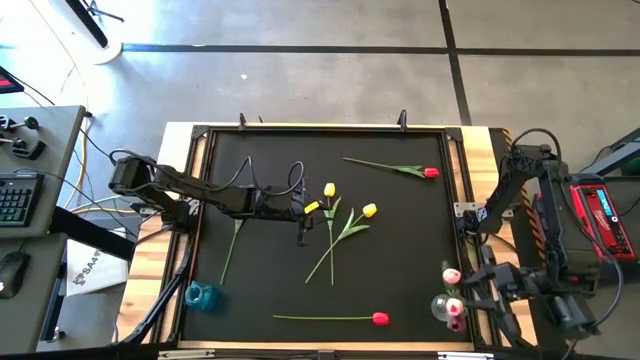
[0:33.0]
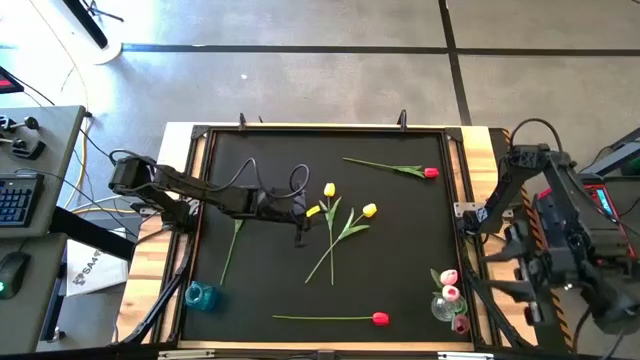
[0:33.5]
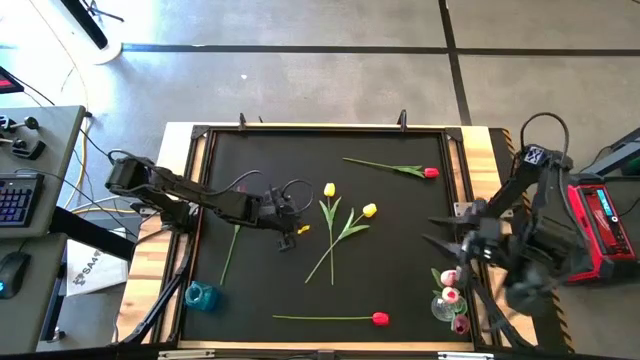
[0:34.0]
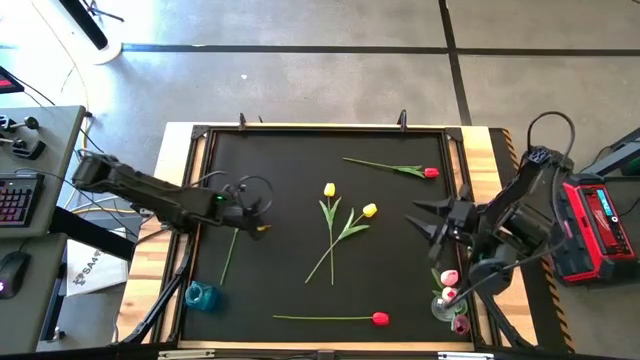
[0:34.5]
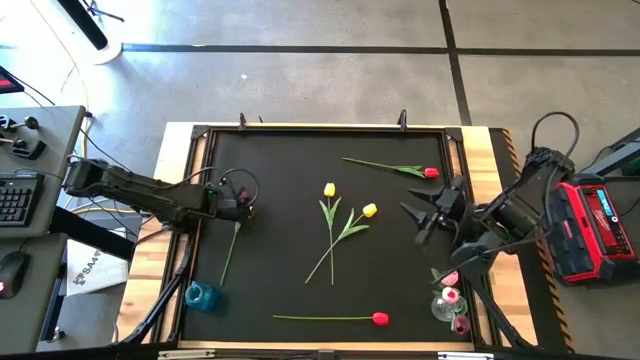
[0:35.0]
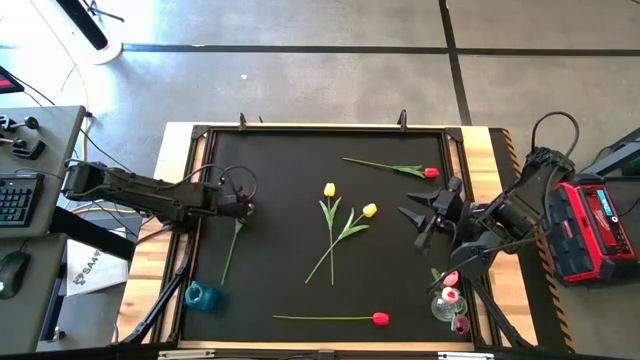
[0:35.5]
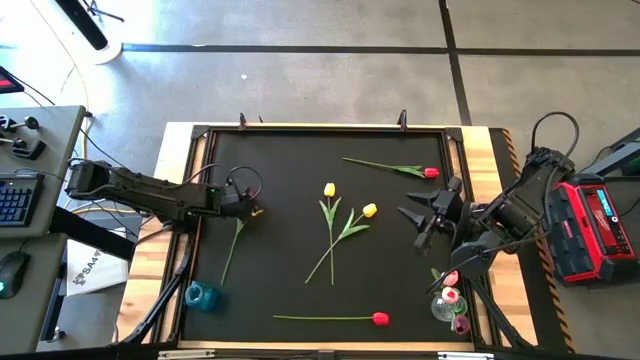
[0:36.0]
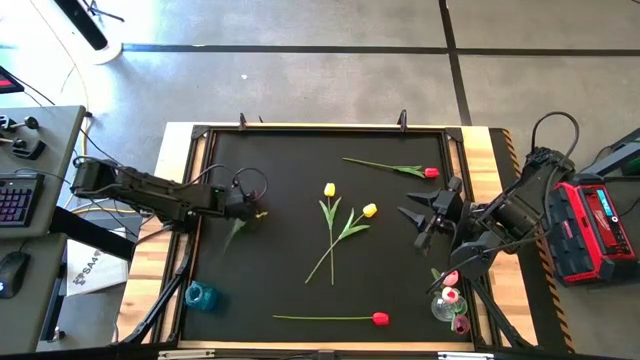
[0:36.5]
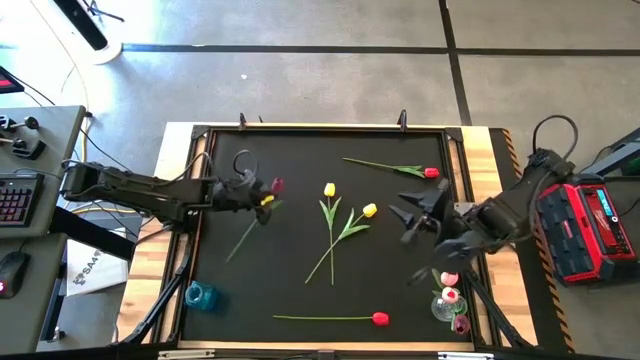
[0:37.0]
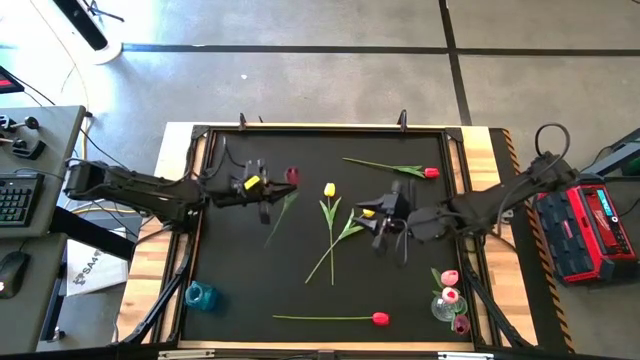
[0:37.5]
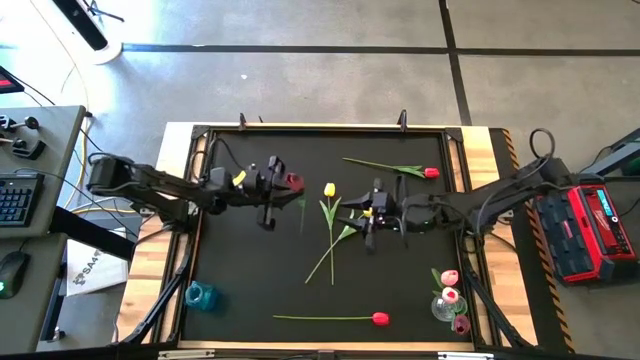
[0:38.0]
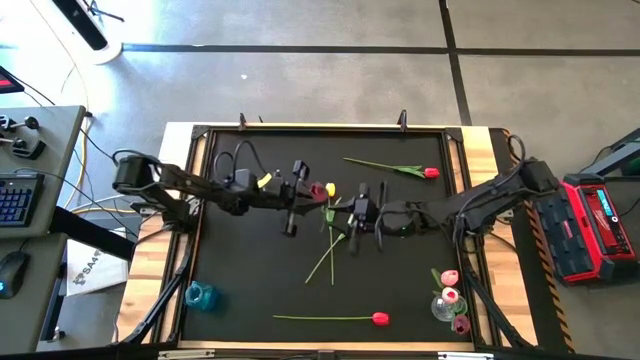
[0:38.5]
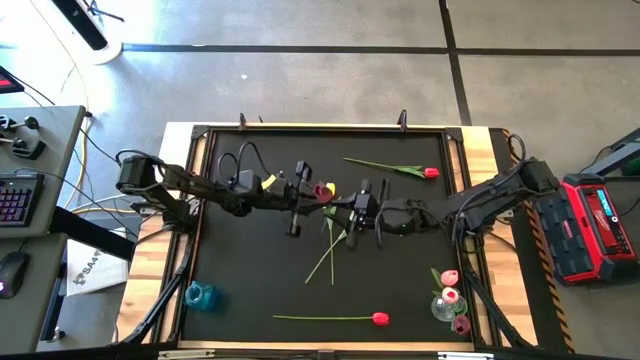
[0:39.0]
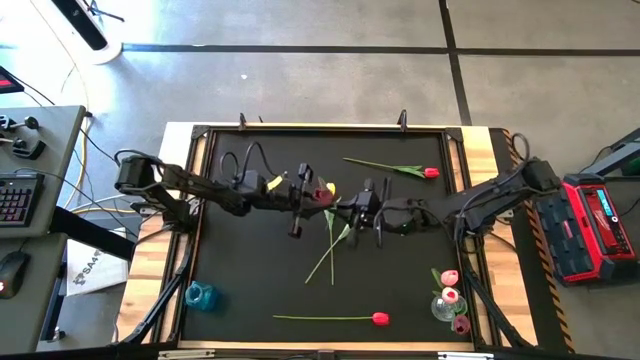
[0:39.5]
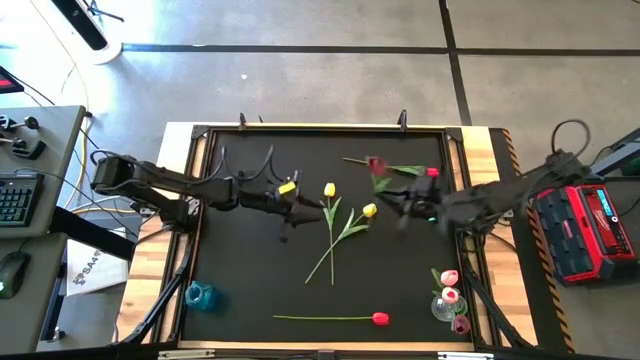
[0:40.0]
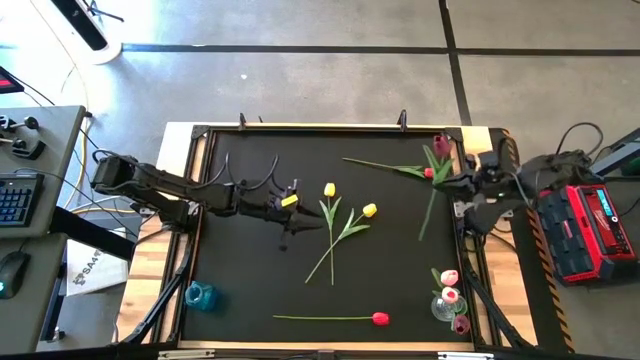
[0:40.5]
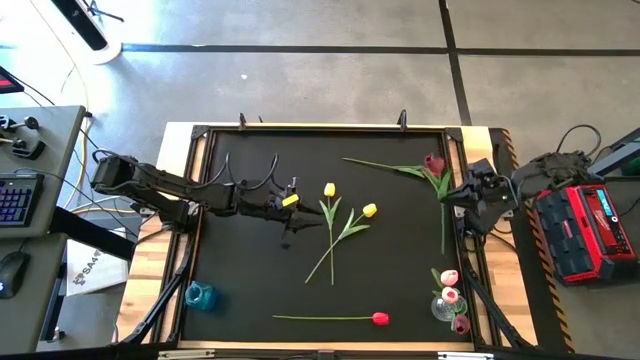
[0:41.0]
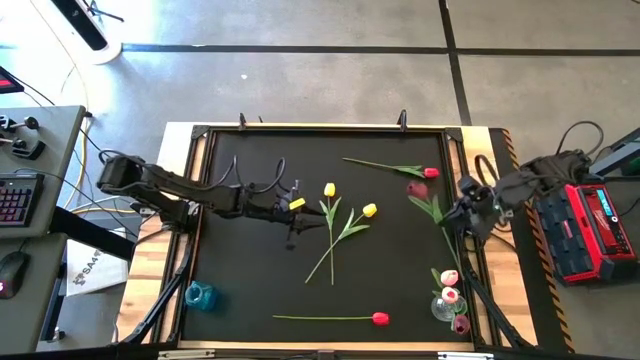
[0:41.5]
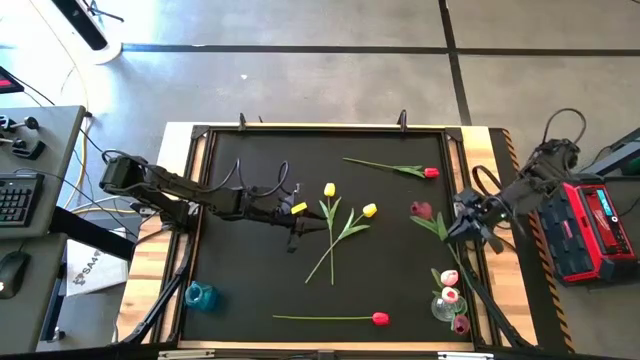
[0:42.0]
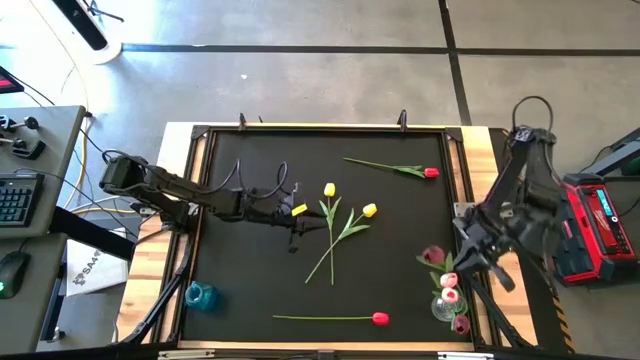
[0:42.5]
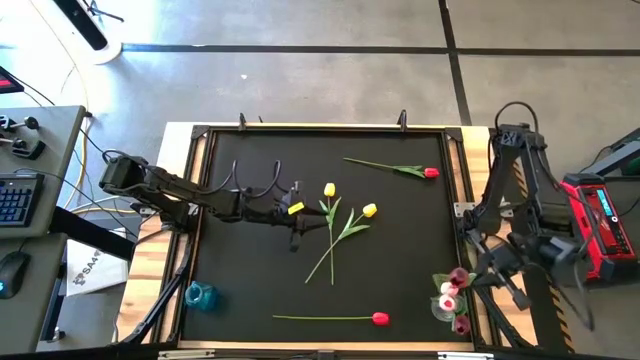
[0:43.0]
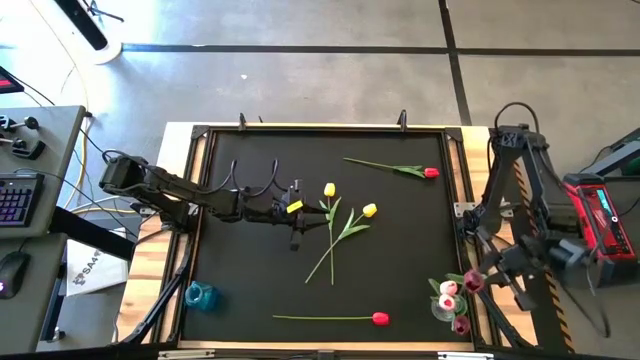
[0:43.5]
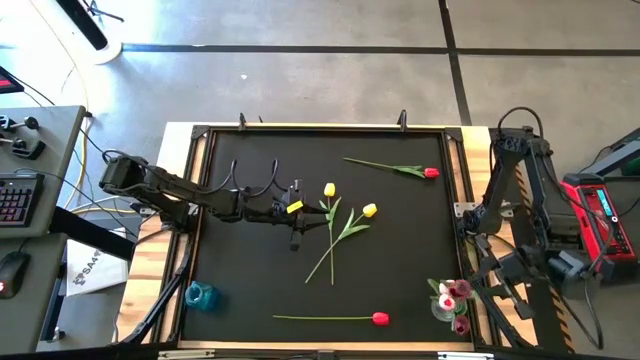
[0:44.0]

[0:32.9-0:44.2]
Task: Sort flowers into vase by color
Put the dark pink flower into the transparent vase

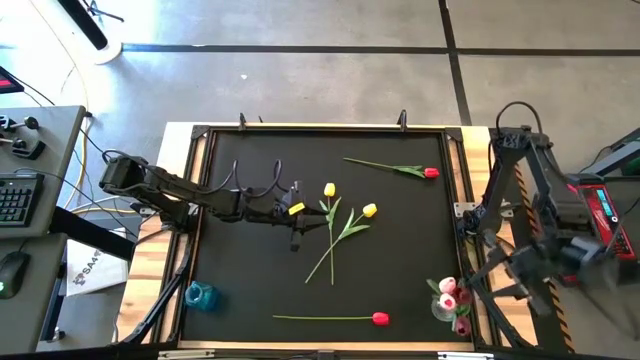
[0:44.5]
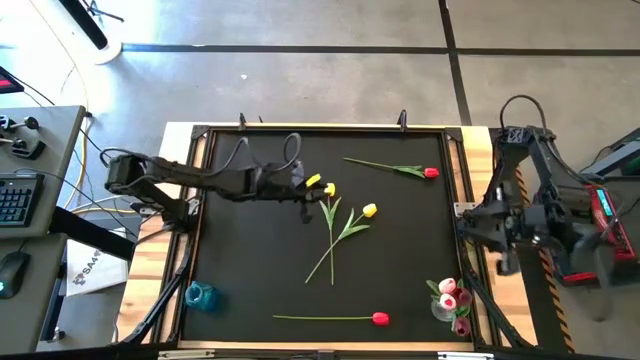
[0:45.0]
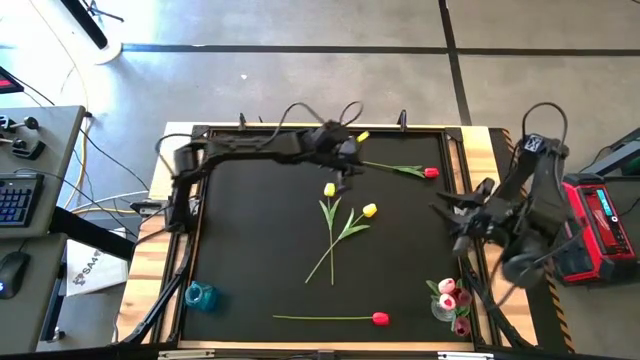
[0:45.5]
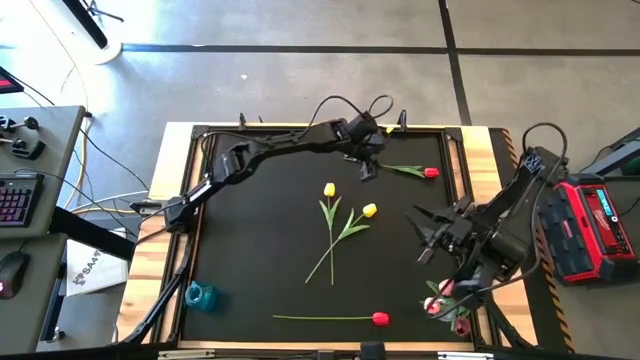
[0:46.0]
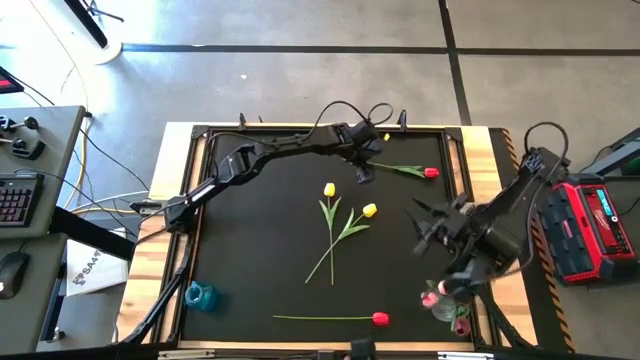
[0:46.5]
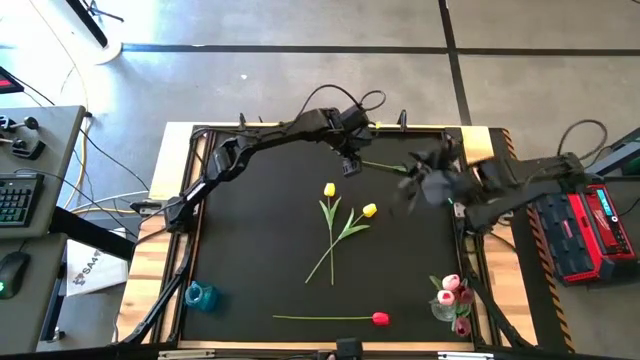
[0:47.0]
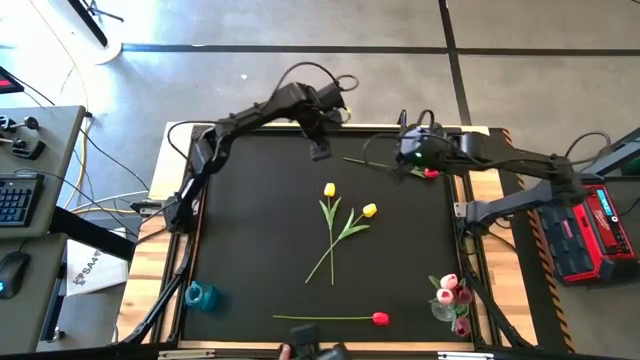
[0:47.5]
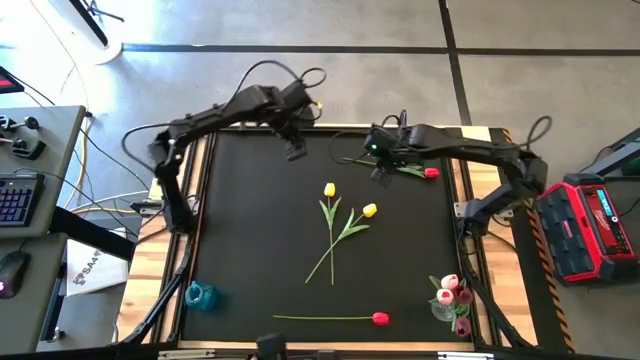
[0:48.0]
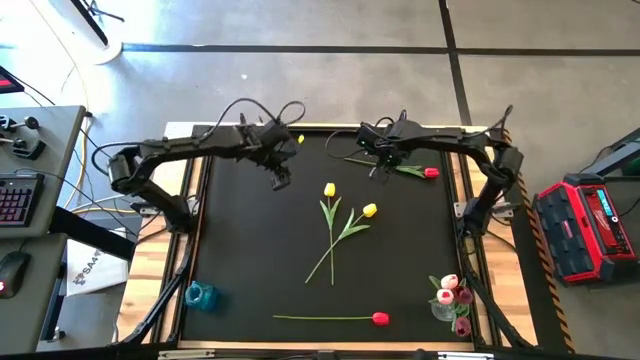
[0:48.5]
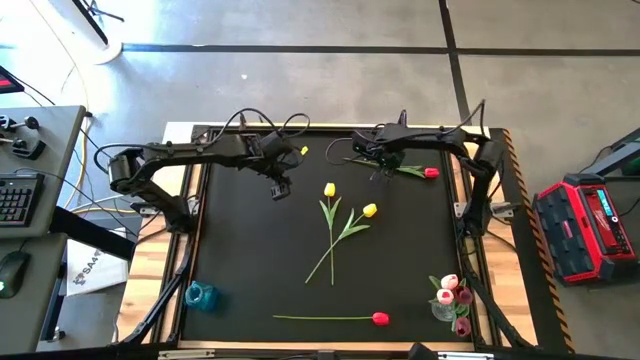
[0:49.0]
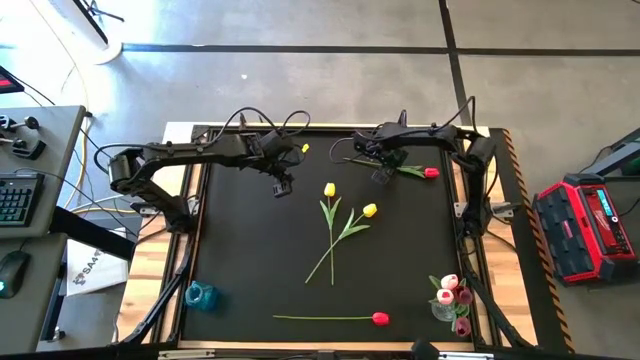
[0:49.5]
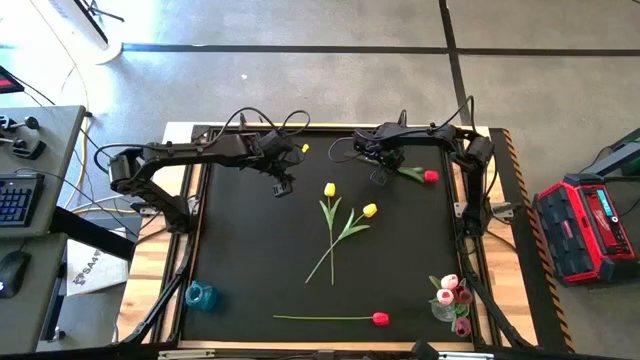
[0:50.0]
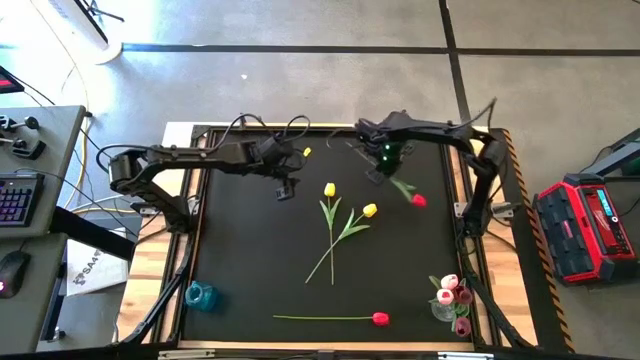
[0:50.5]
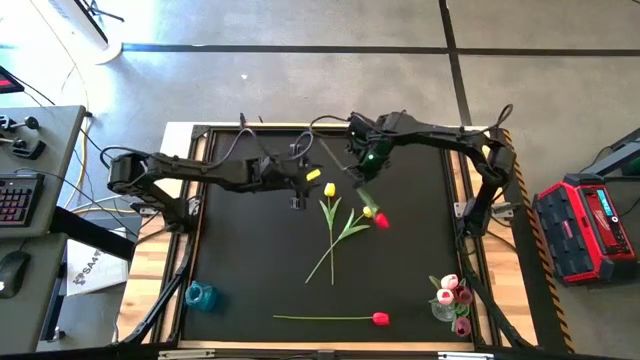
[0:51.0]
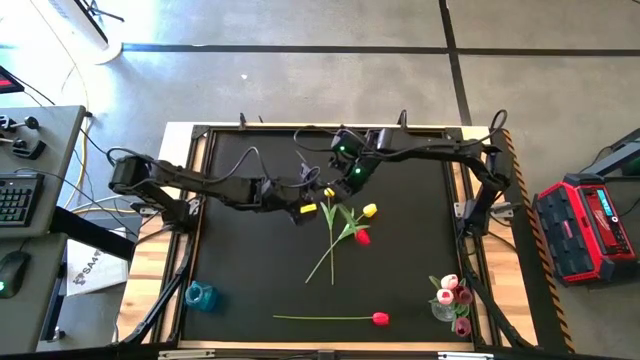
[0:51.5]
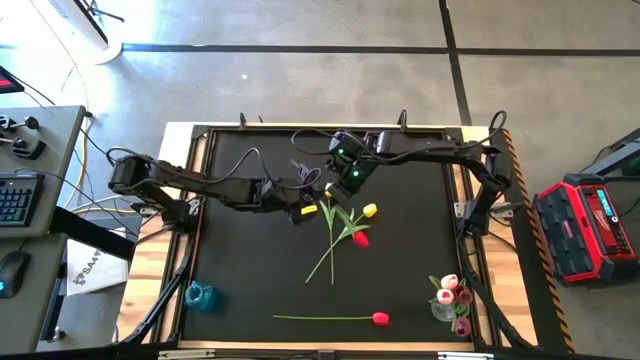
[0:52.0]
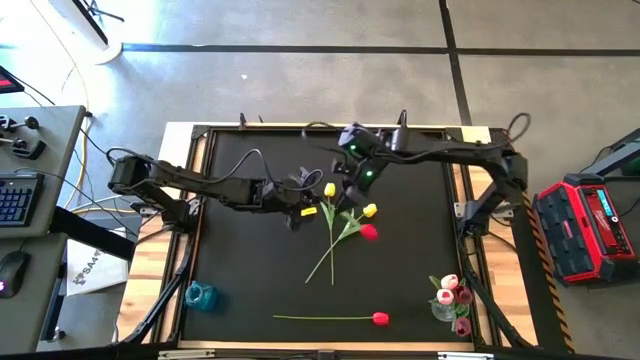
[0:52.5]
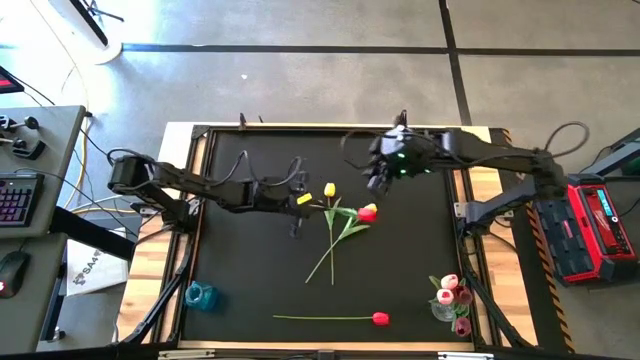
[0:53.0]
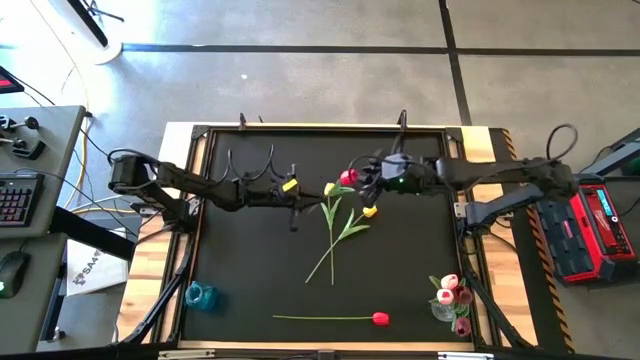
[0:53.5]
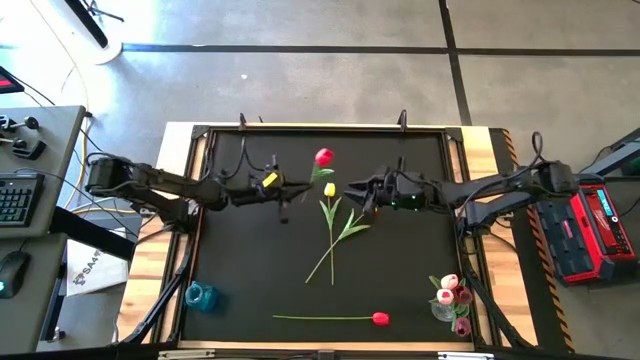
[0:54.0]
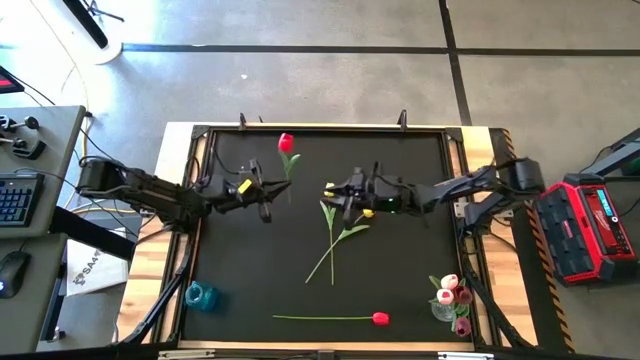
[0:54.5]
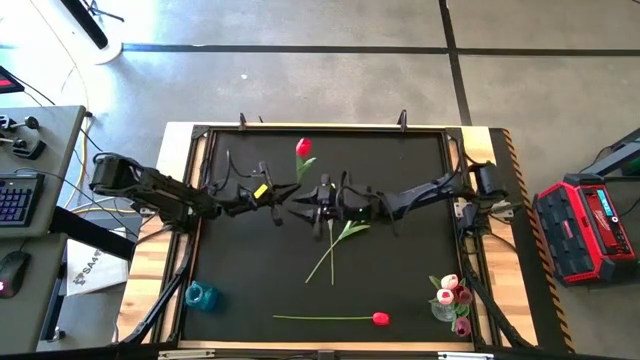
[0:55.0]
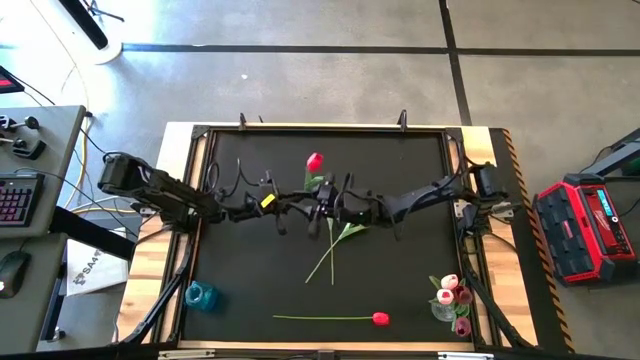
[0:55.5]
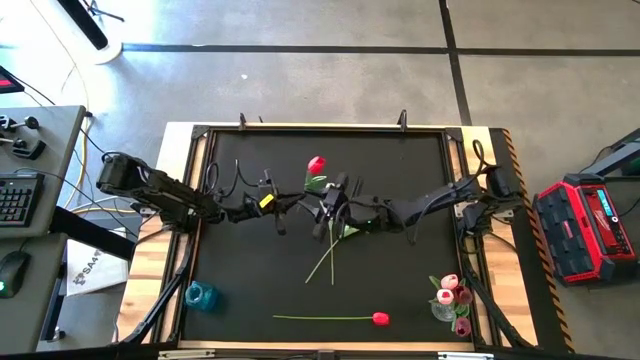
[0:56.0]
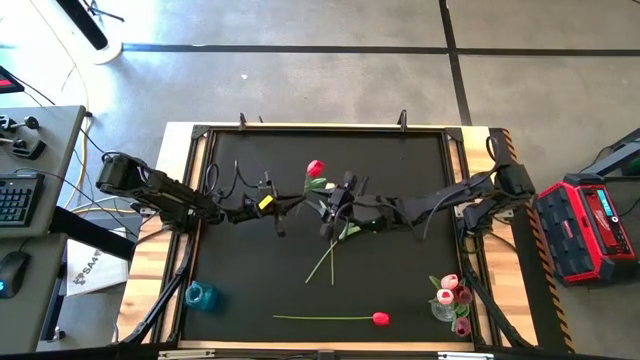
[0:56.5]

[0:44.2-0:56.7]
Put the top red flower into the blue vase
